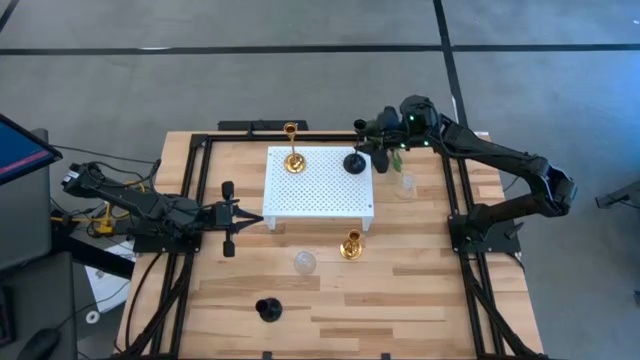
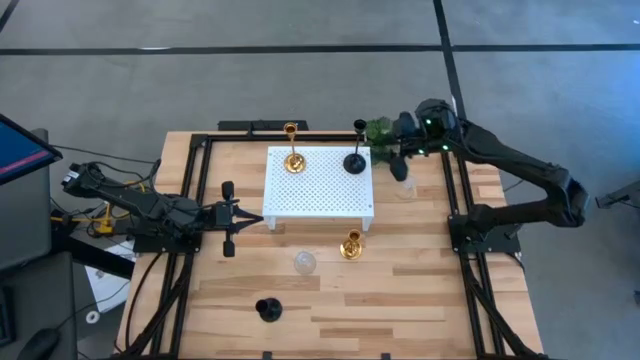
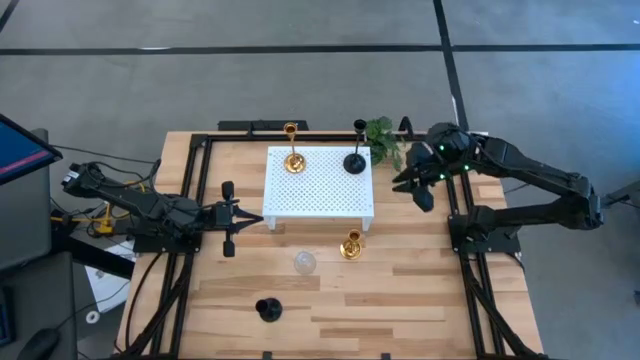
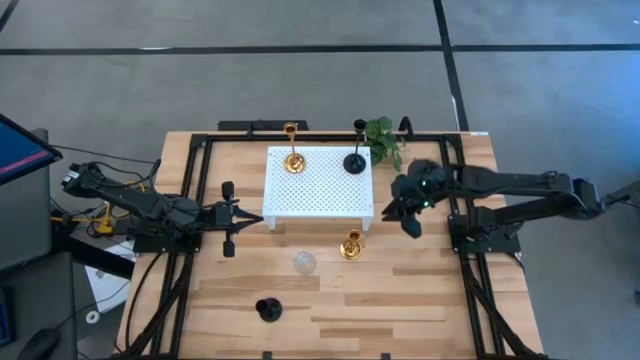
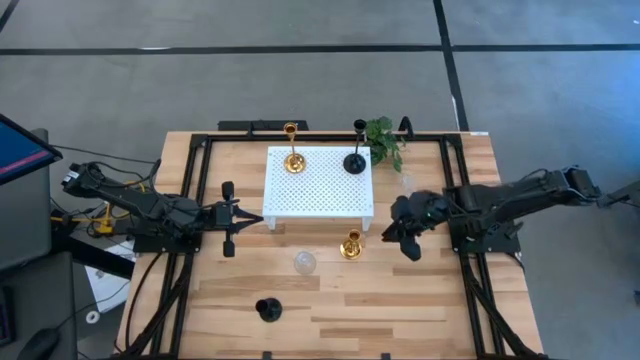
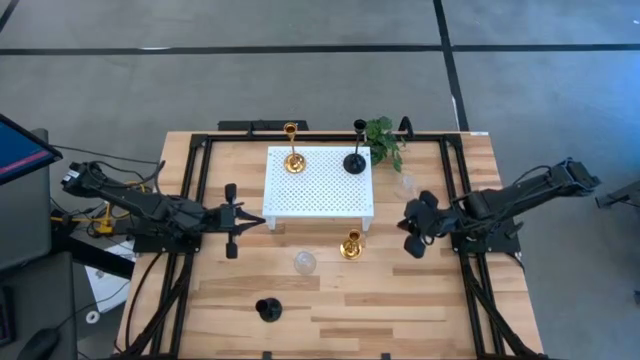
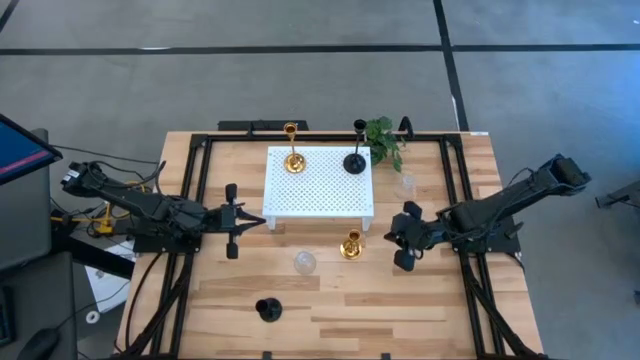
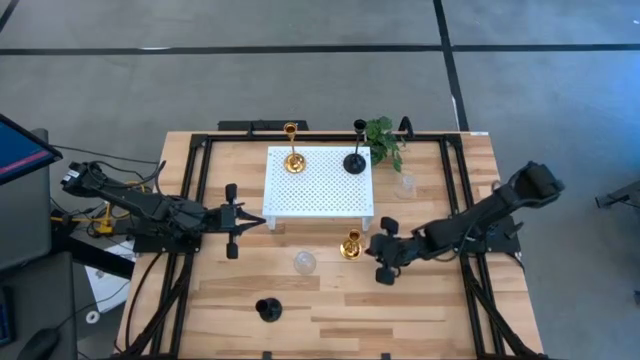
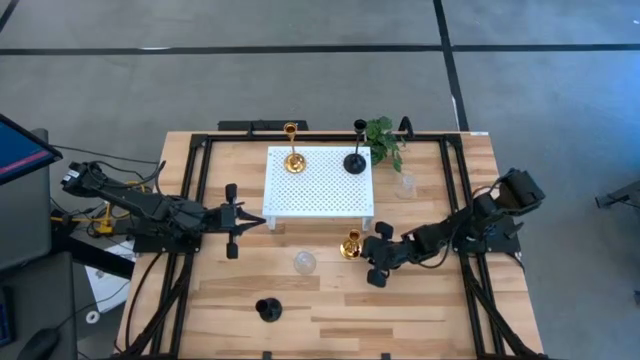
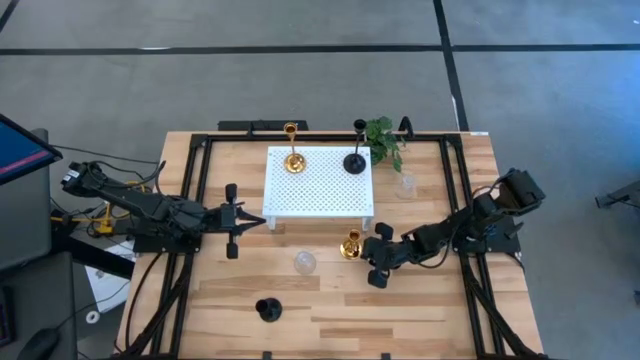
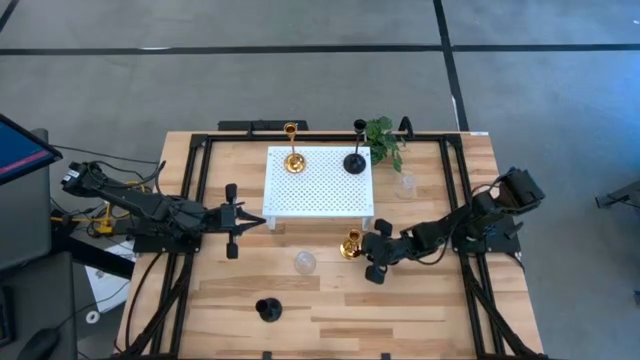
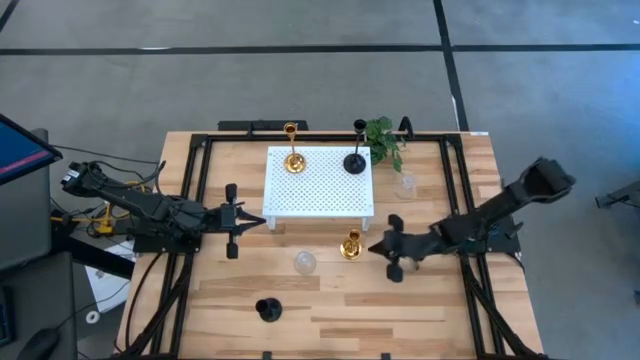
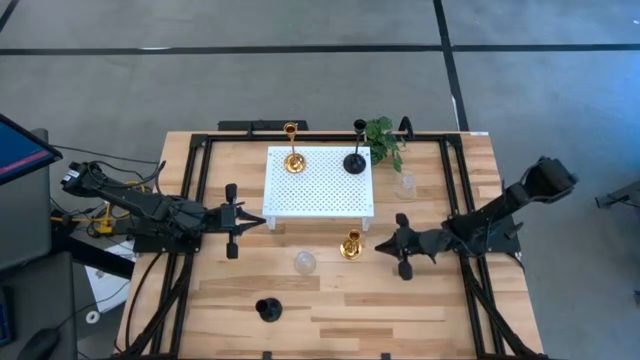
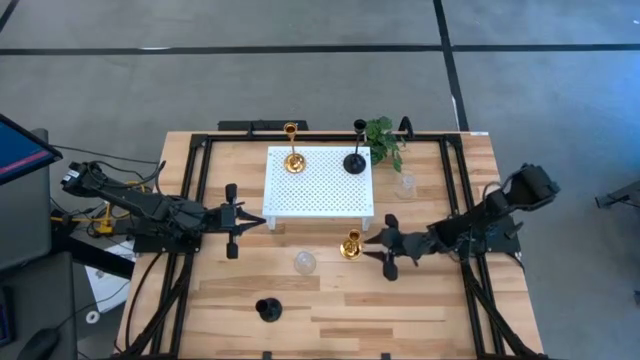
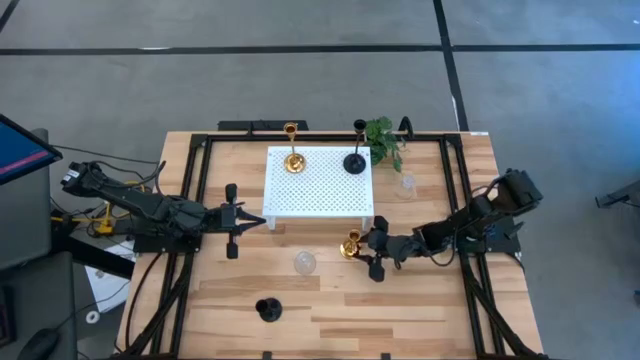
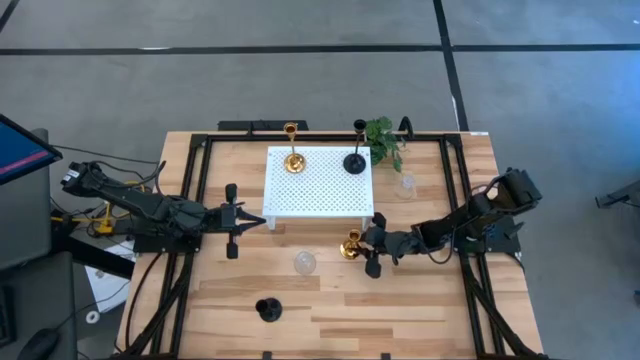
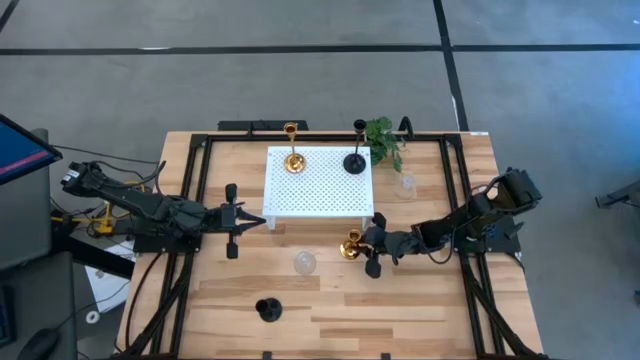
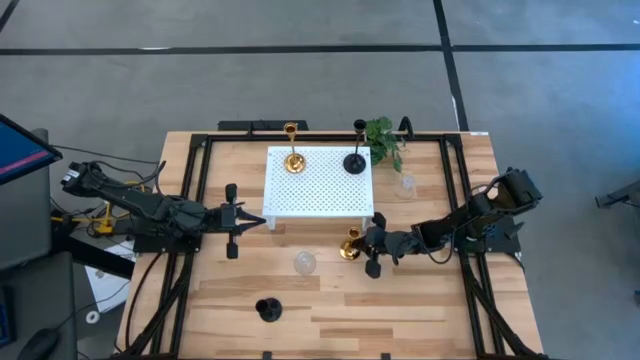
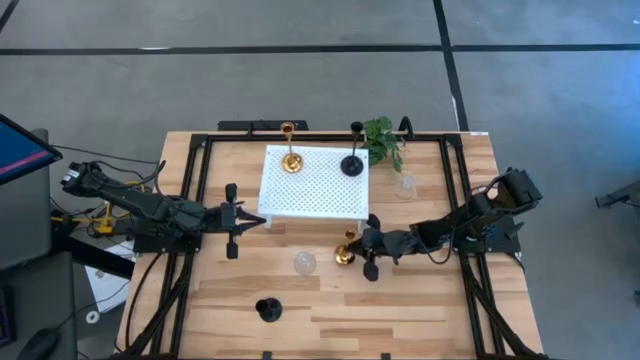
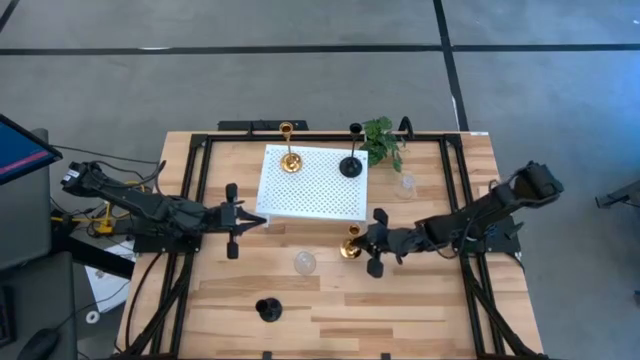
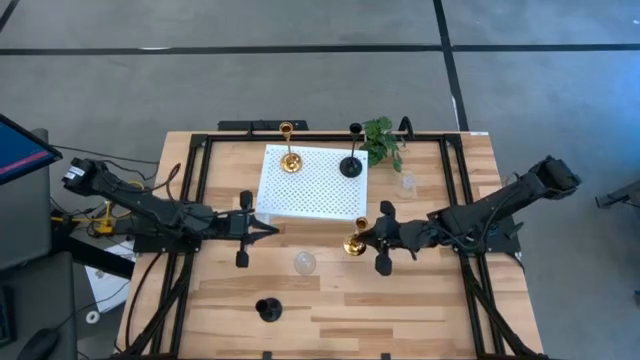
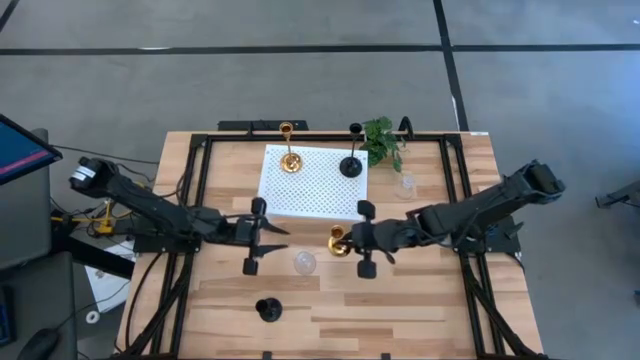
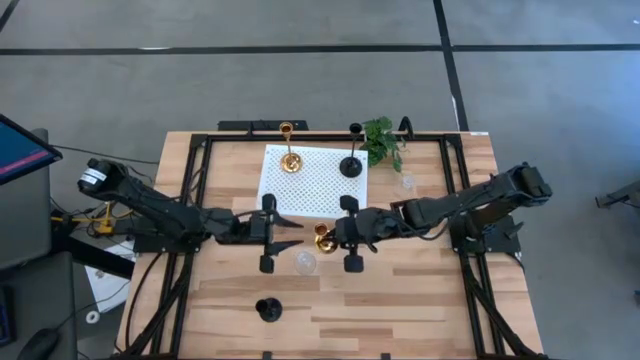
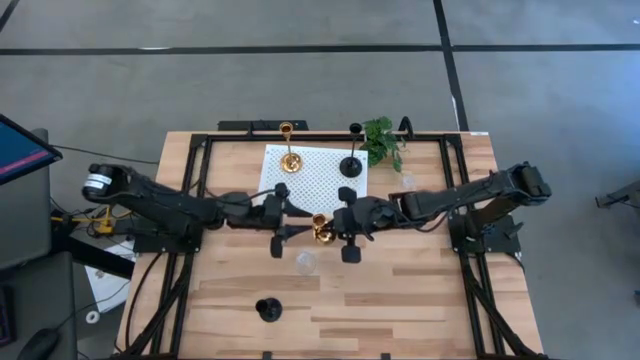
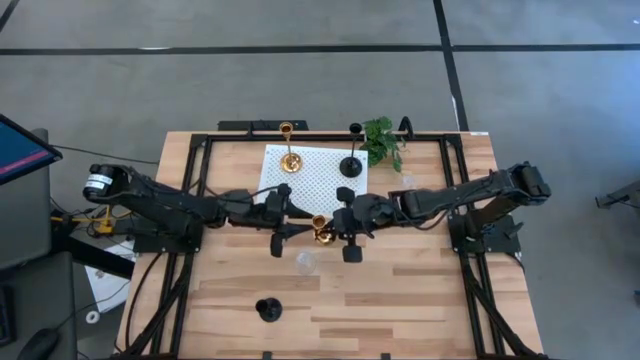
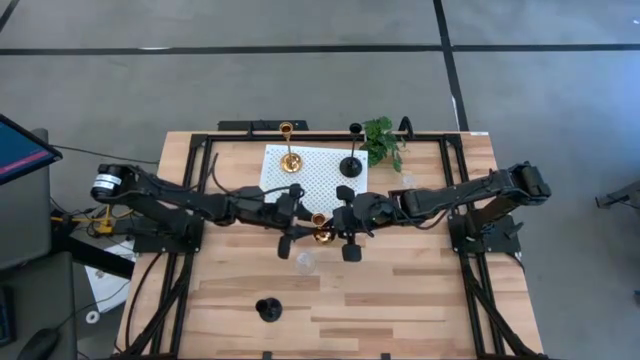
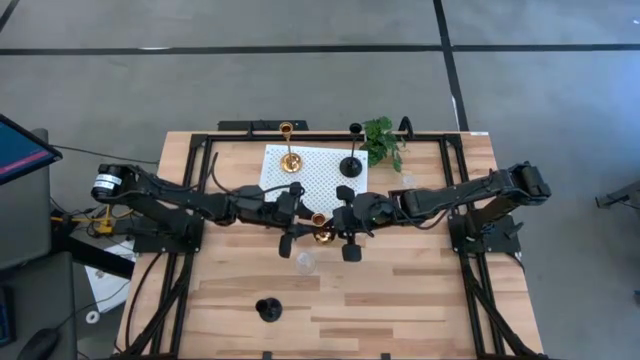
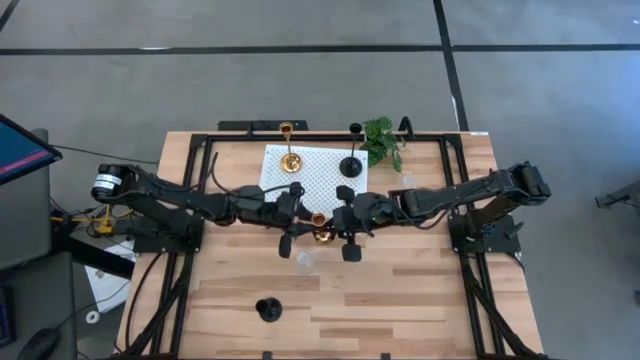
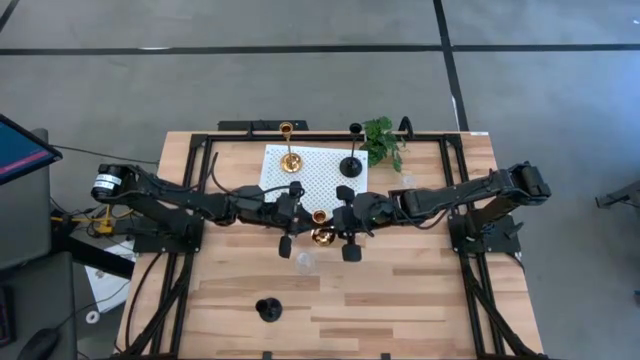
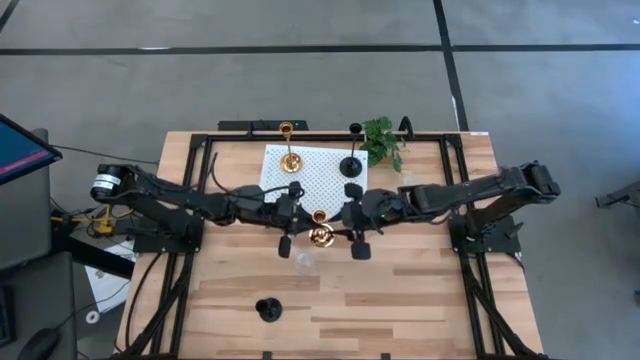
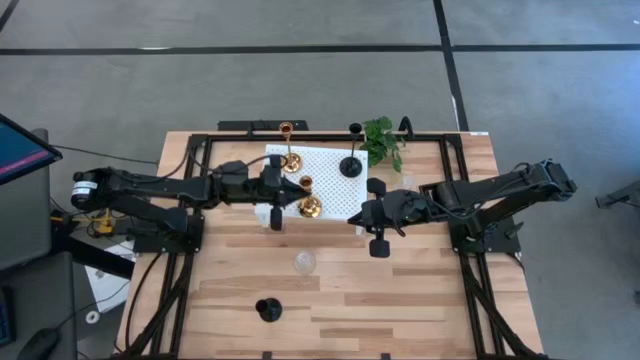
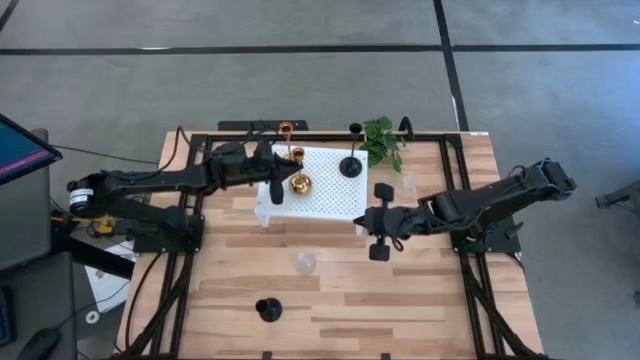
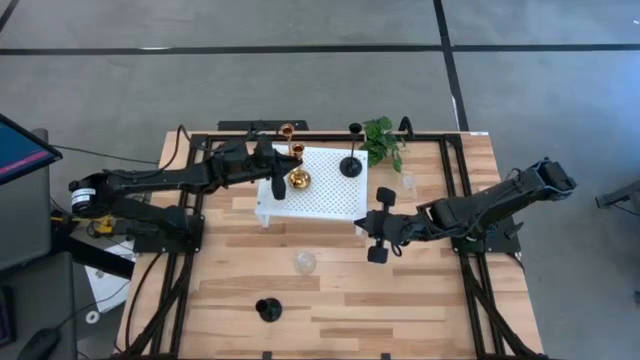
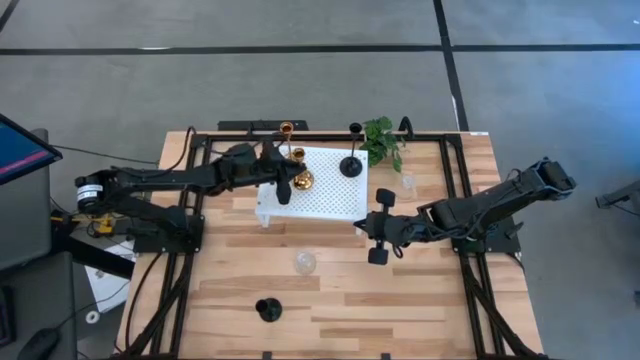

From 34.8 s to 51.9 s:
Task: Pick & Place candle stick holders
Put the gold candle holder on the shelf

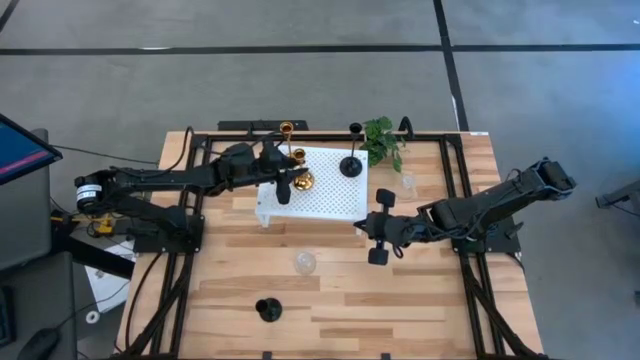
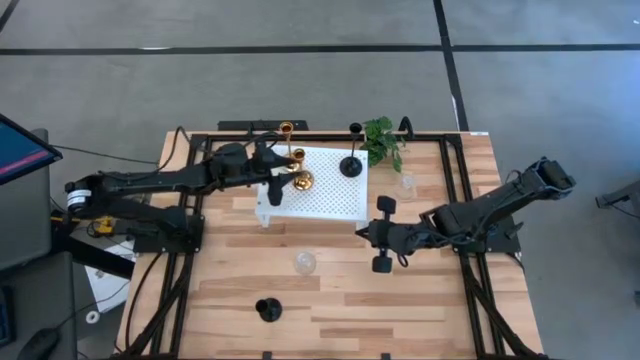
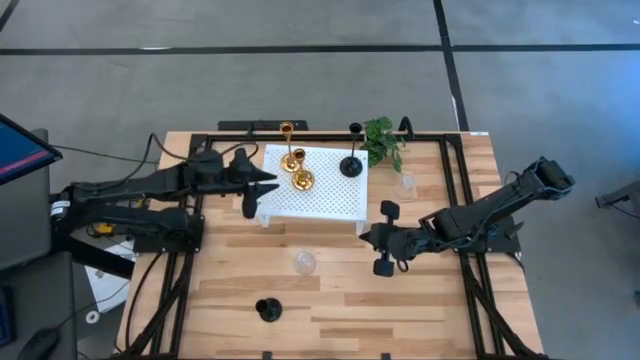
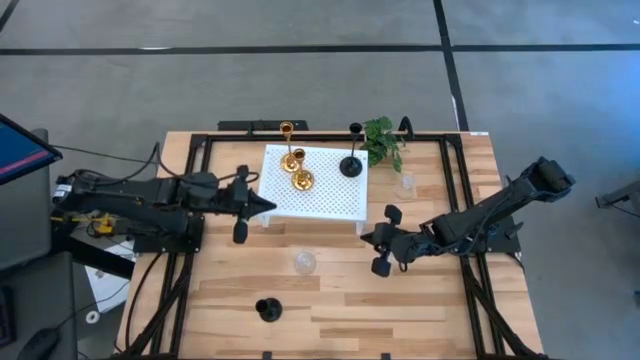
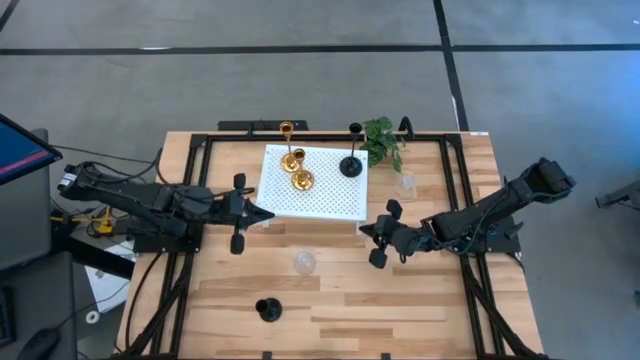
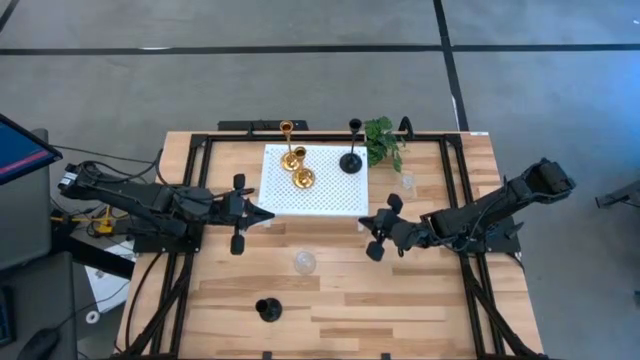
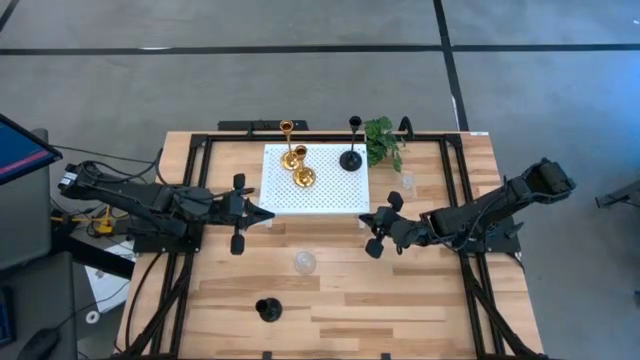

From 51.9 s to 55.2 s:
Adjust the shelf
